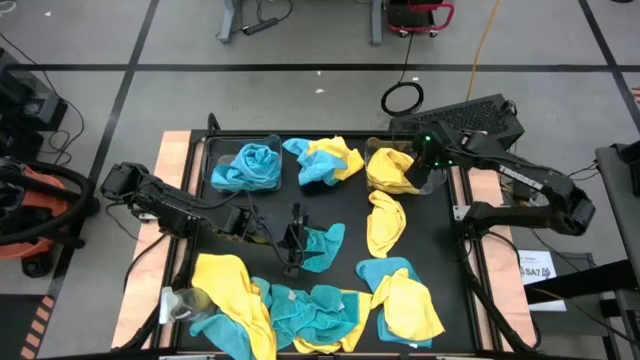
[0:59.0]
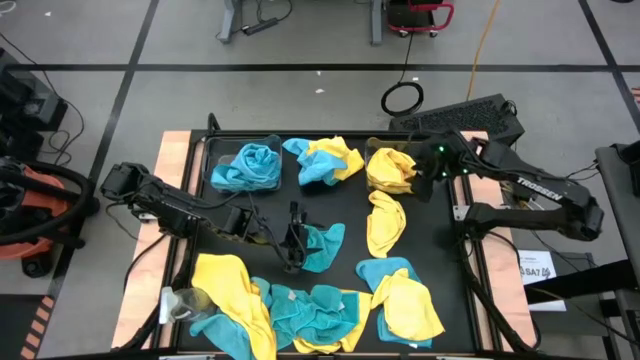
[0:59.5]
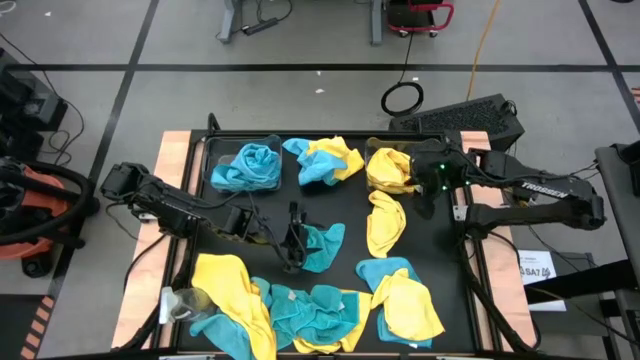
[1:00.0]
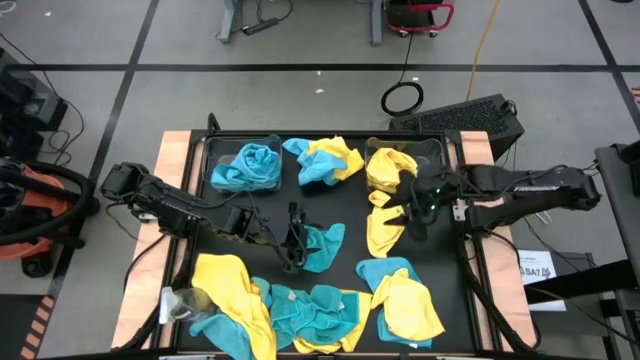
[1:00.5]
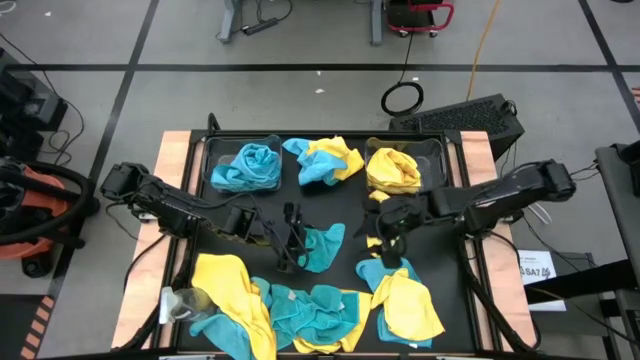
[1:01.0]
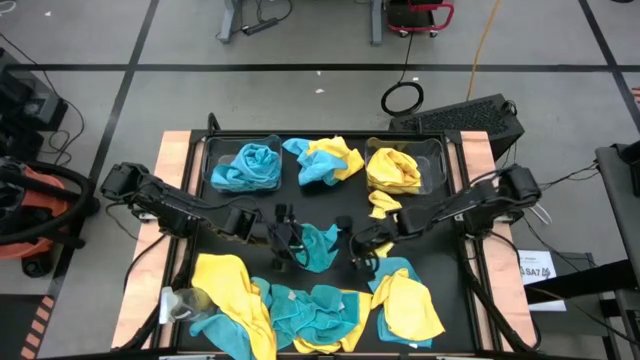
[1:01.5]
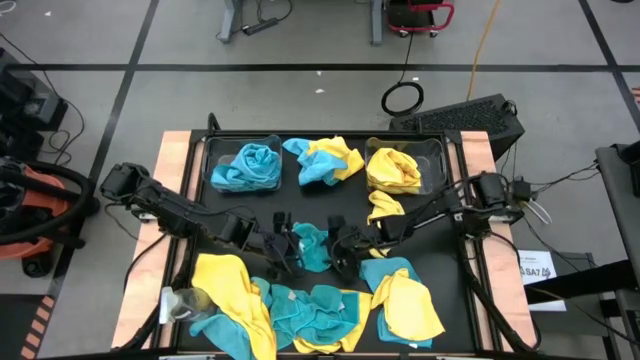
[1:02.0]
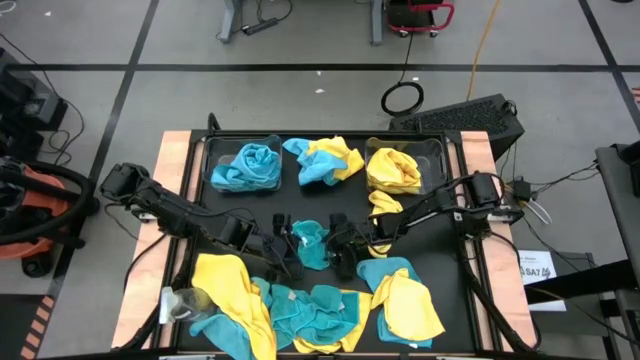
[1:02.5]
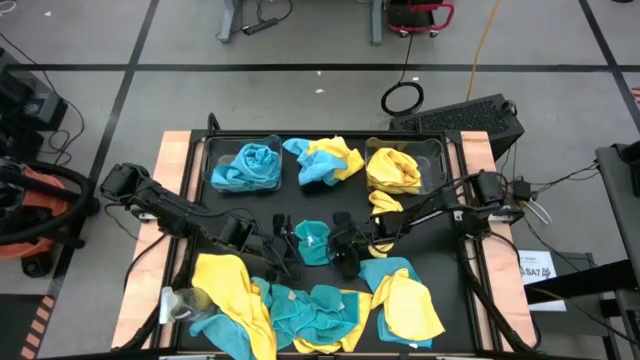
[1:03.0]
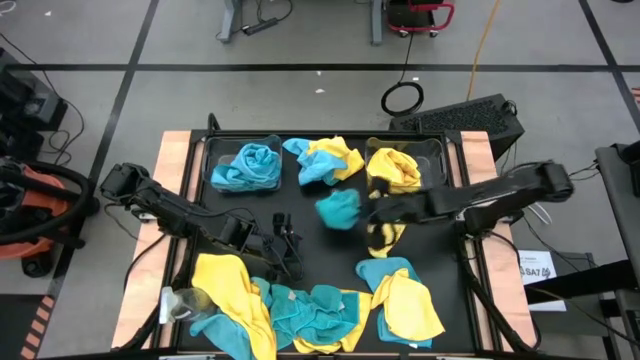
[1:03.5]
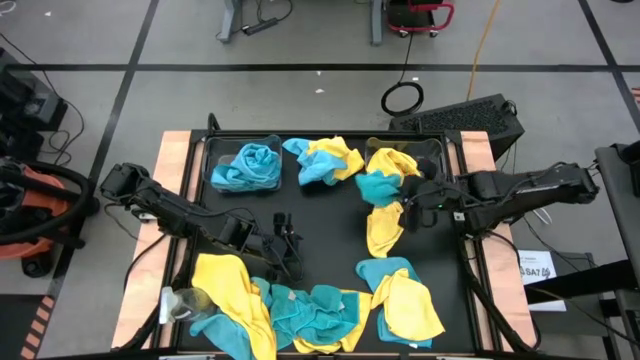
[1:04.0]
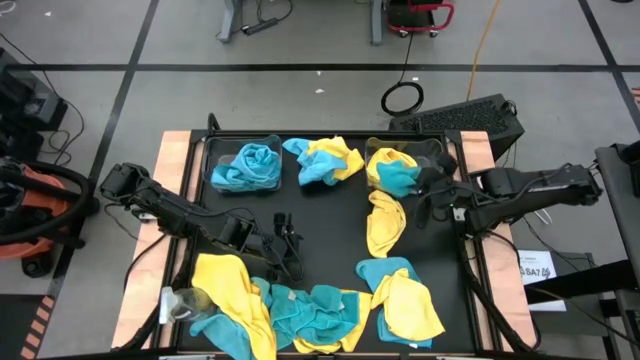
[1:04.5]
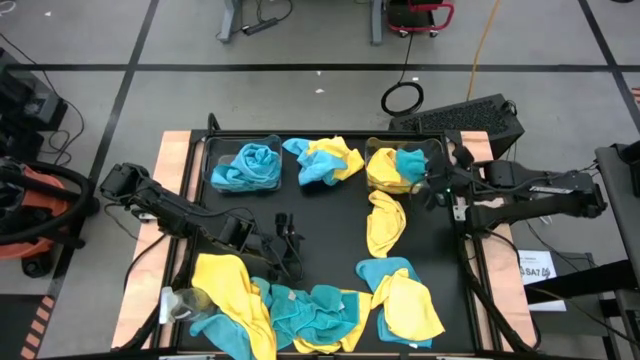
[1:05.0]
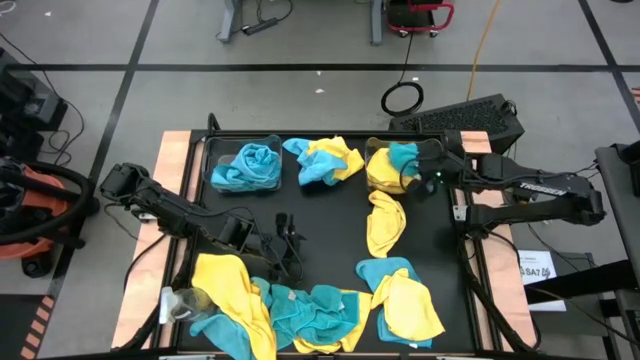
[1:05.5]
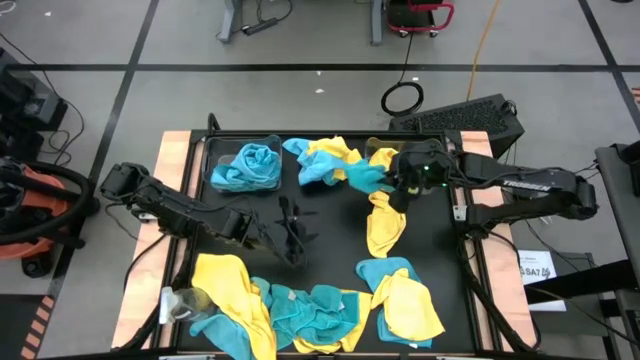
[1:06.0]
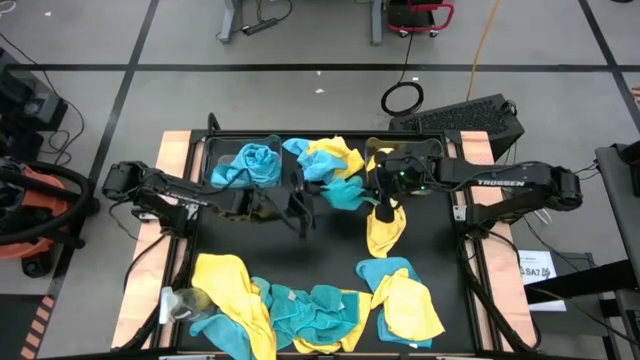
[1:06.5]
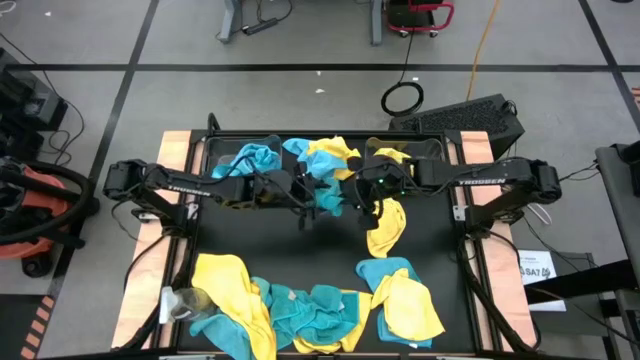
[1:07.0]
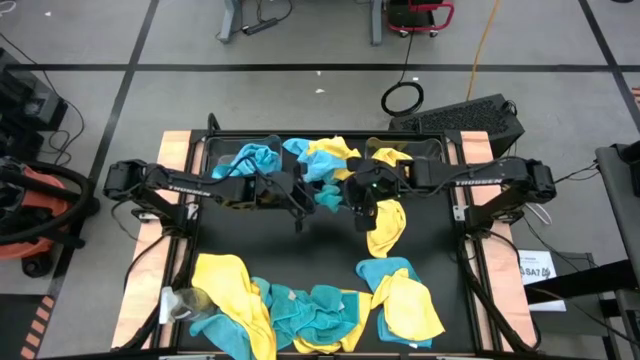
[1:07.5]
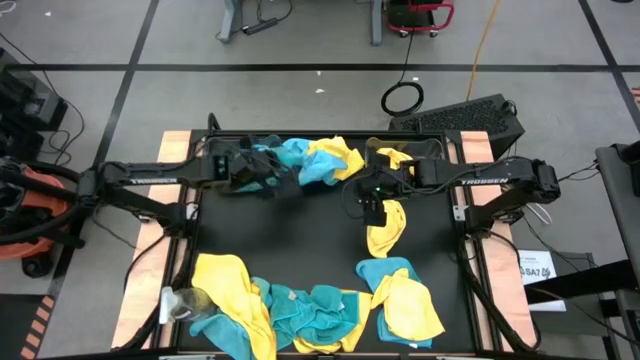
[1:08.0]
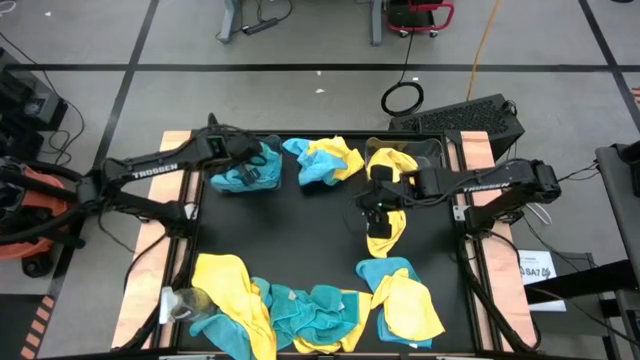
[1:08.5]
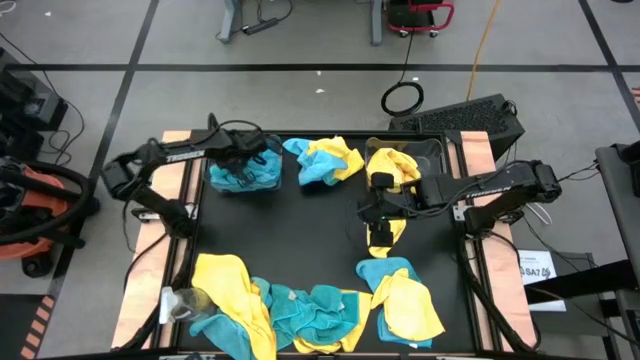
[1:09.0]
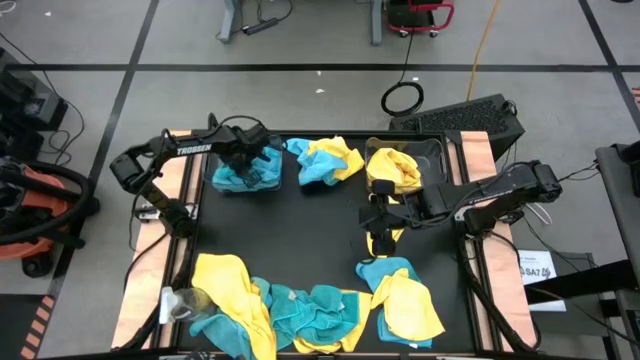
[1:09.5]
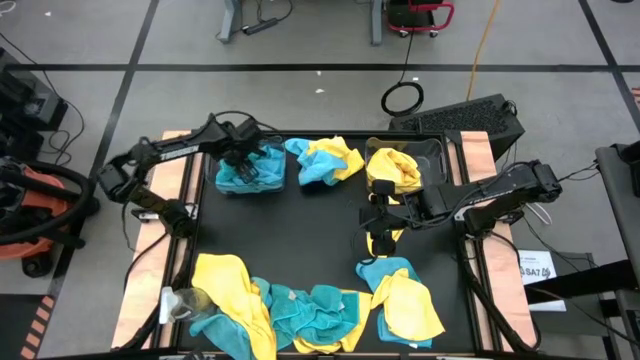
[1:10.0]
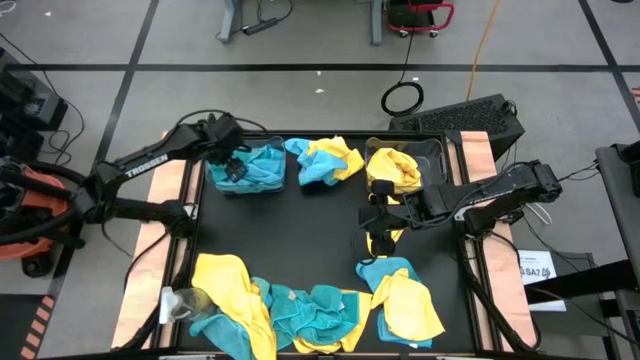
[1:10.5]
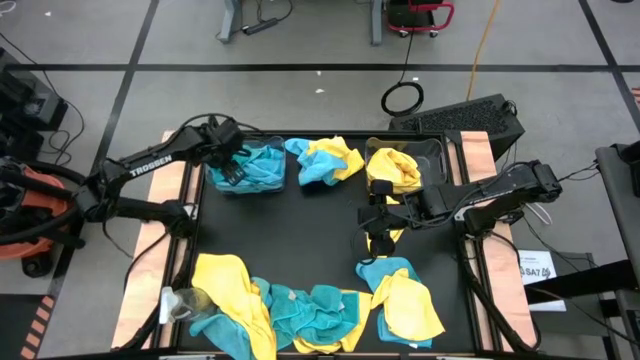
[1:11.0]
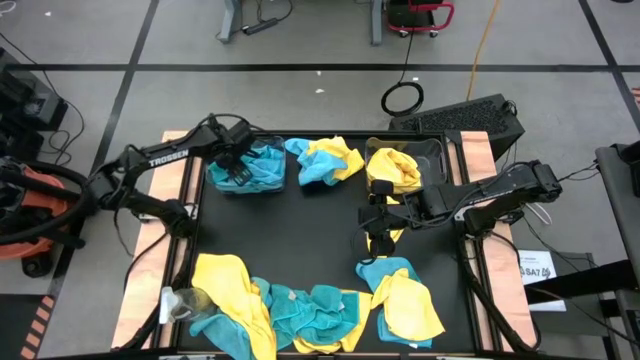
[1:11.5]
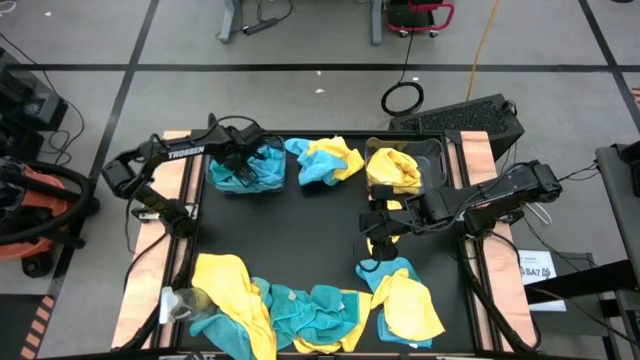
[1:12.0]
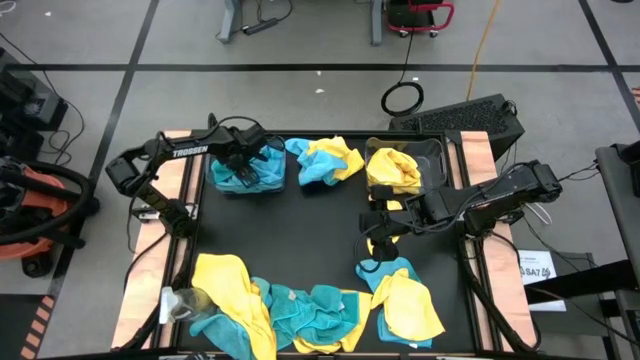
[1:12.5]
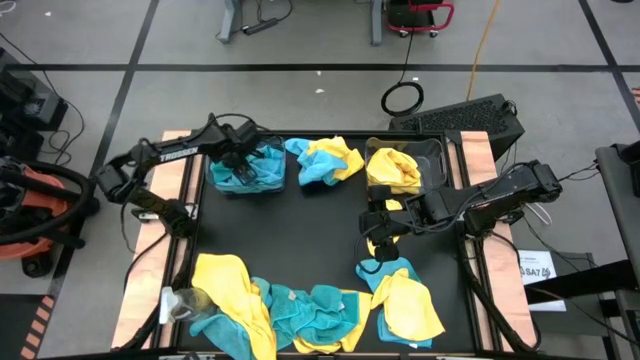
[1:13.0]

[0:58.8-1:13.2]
Task: Sort microfiber towel by color & place in baskets
Put the blue microfiber cloth into the left transparent bin

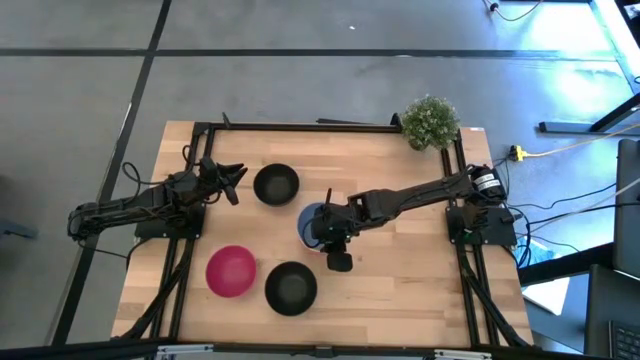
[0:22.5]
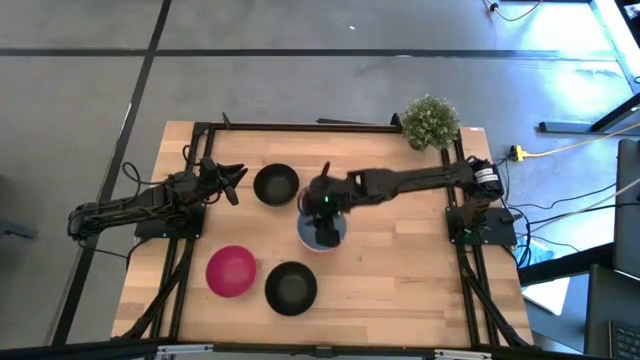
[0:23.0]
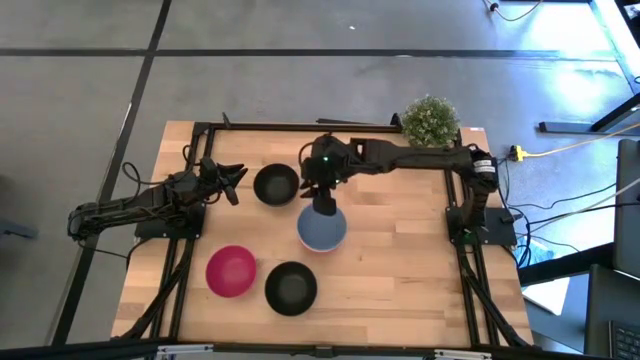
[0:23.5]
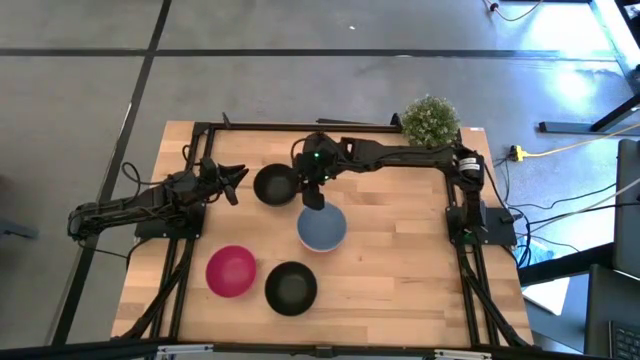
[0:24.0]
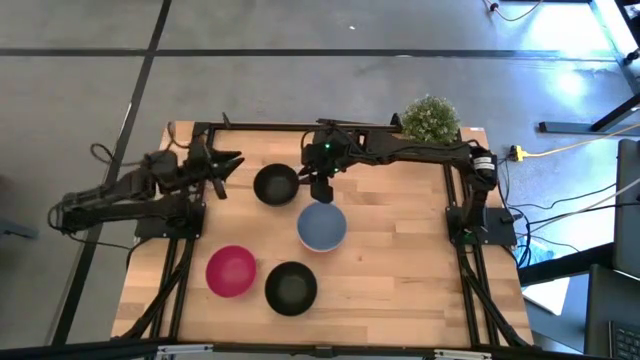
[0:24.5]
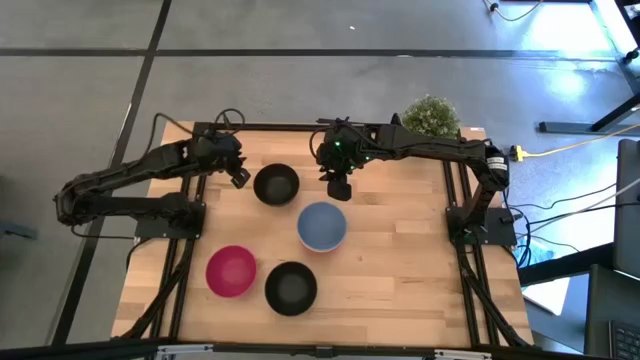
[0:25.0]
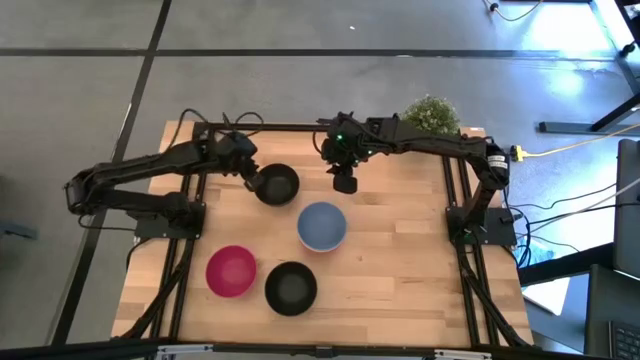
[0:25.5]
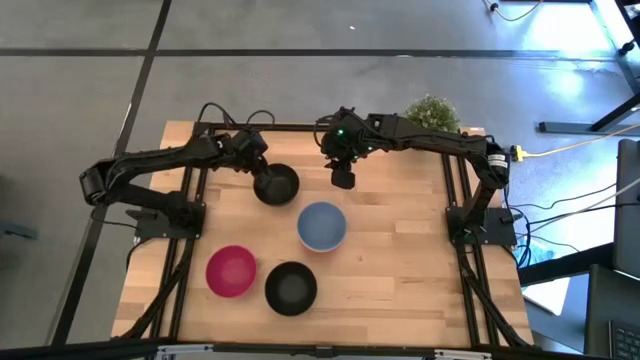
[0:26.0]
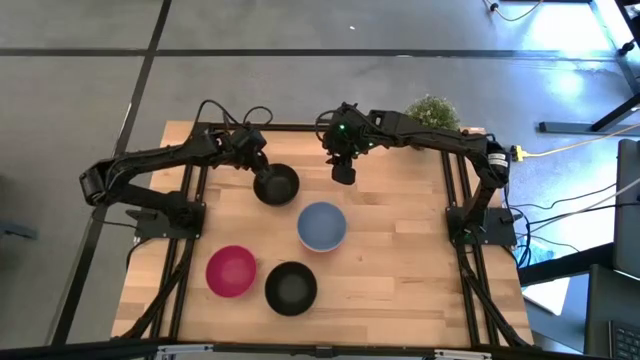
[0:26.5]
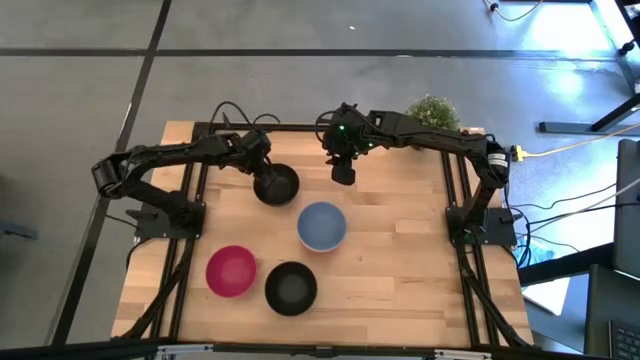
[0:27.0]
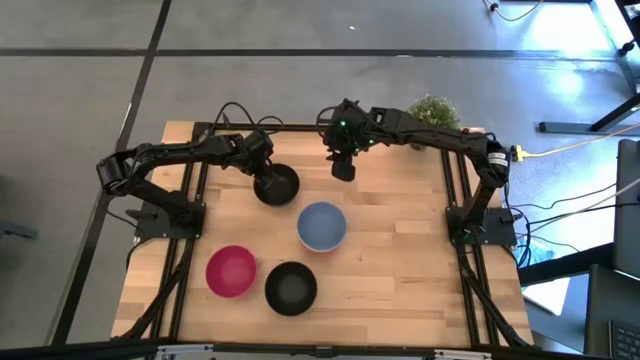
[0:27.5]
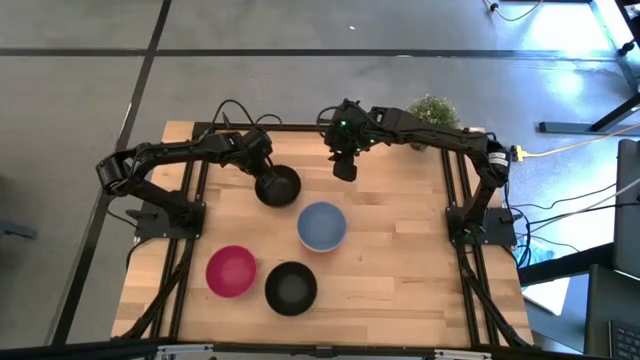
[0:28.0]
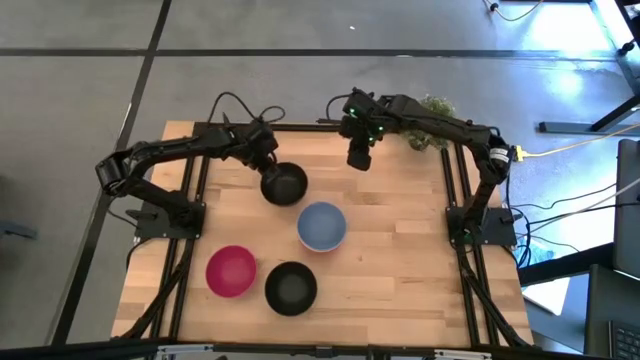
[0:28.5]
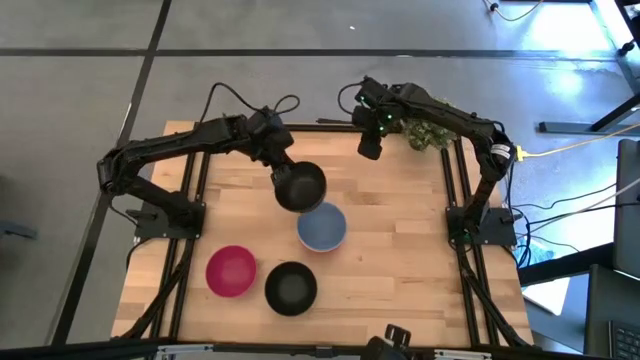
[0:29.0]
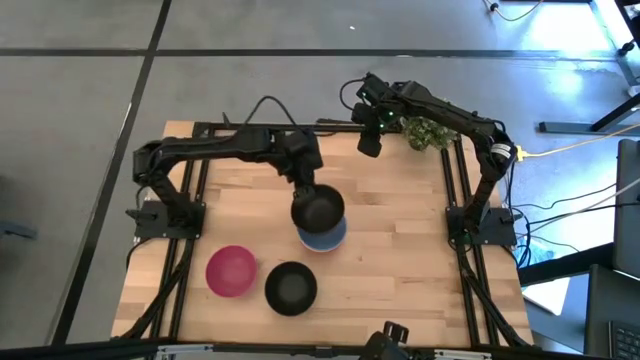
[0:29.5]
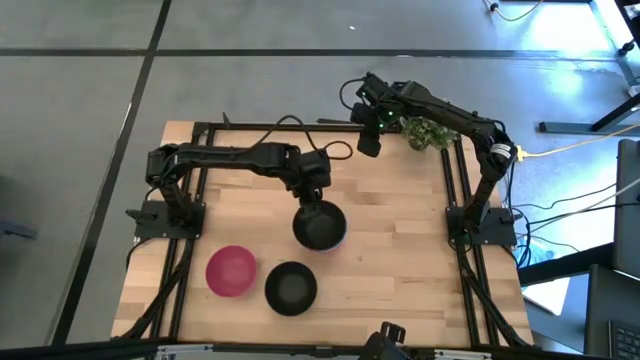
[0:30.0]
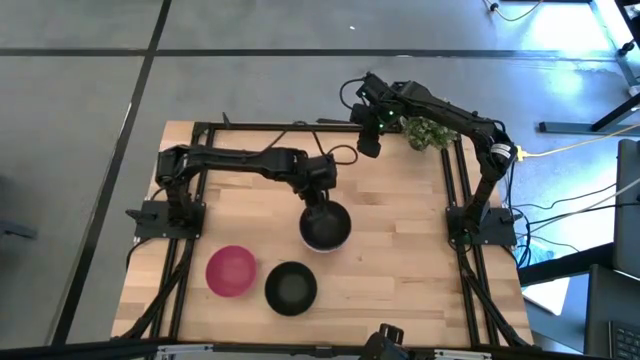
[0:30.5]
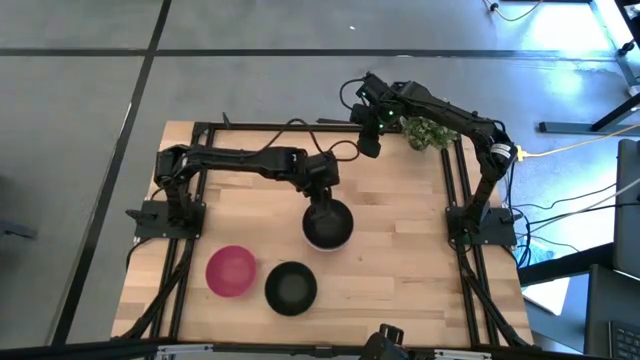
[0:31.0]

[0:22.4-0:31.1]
Task: Nest bowls inside each other
Stack the top black bowl on top of the blue bowl
